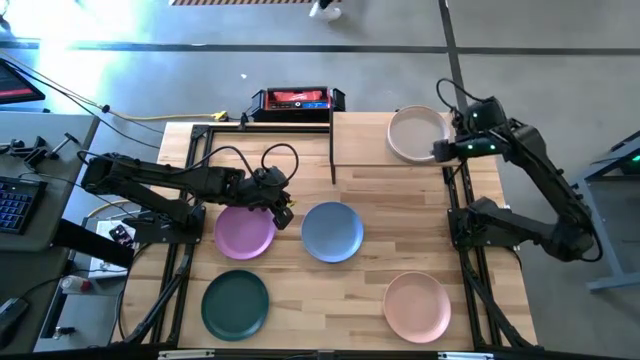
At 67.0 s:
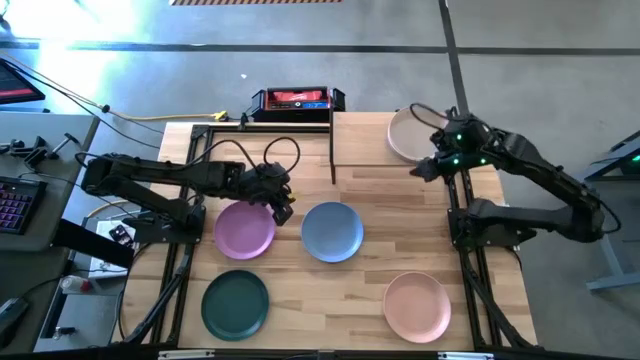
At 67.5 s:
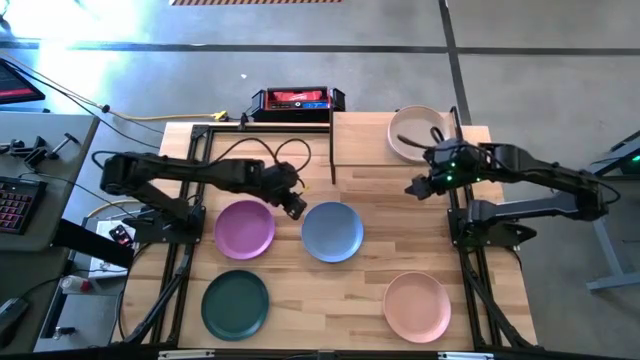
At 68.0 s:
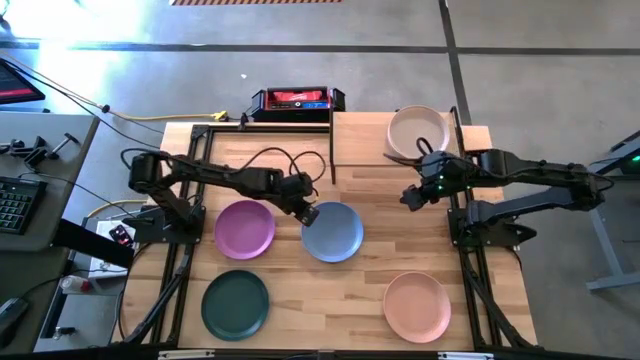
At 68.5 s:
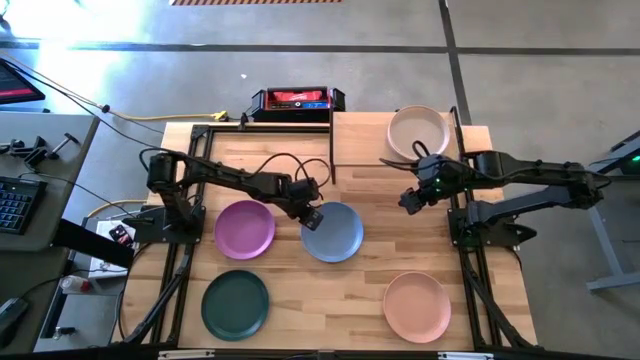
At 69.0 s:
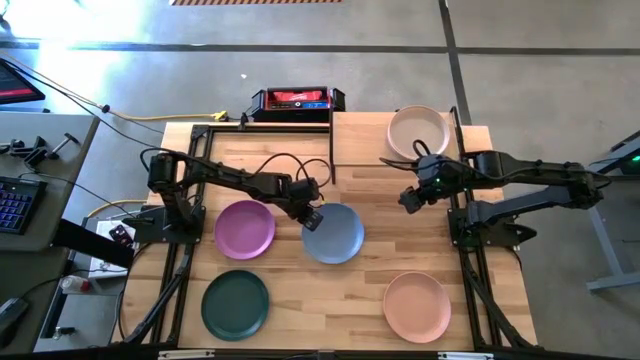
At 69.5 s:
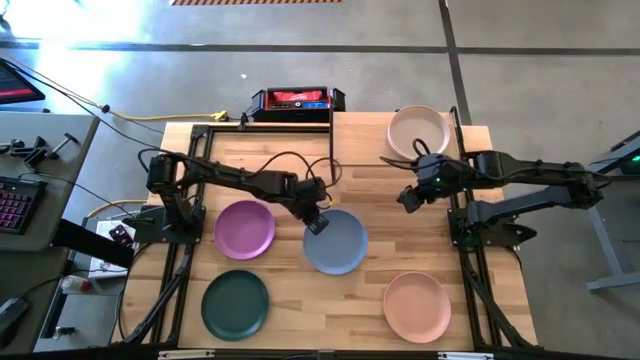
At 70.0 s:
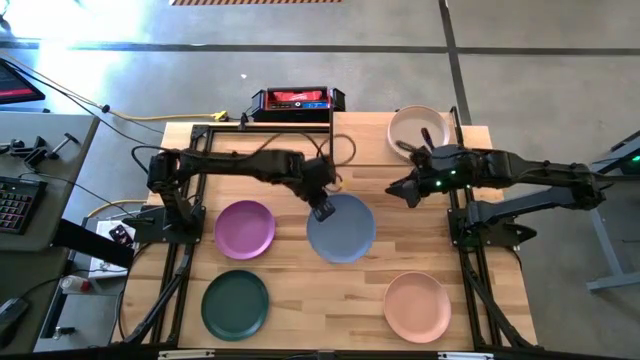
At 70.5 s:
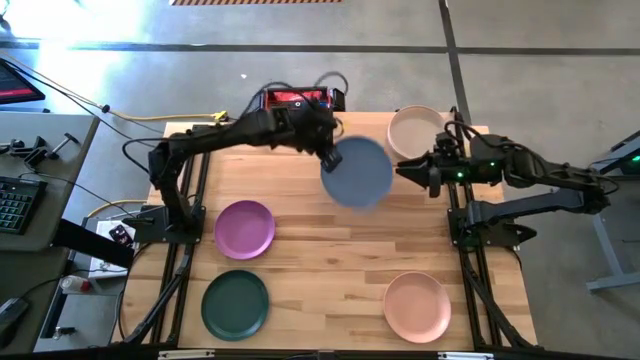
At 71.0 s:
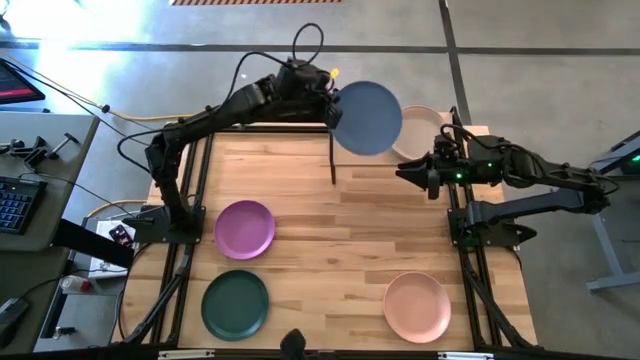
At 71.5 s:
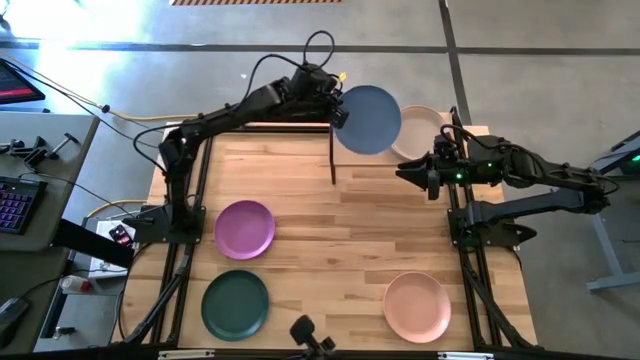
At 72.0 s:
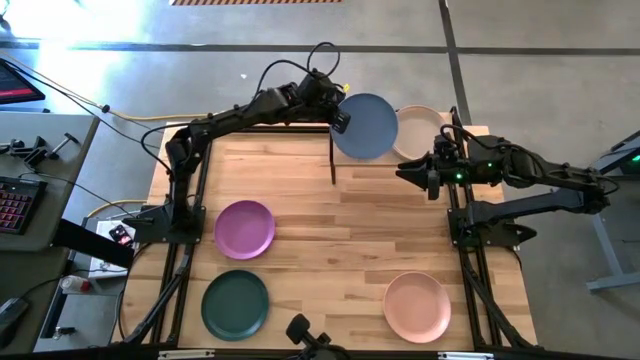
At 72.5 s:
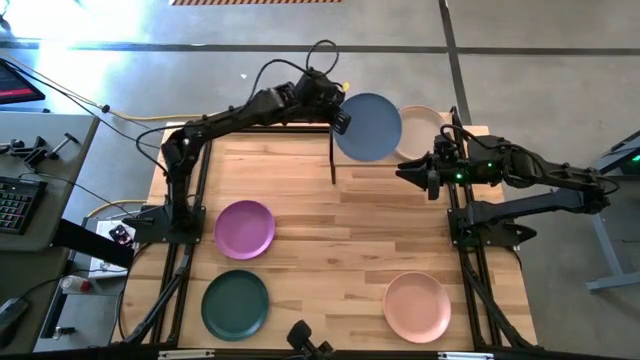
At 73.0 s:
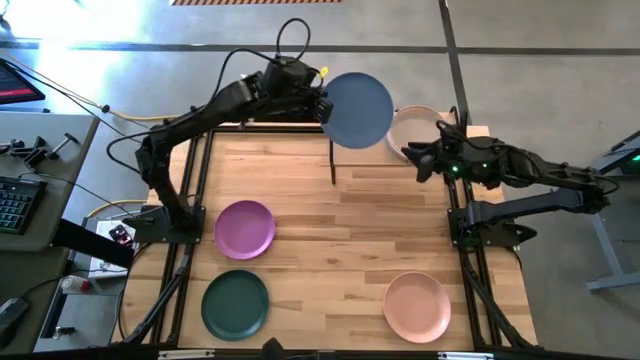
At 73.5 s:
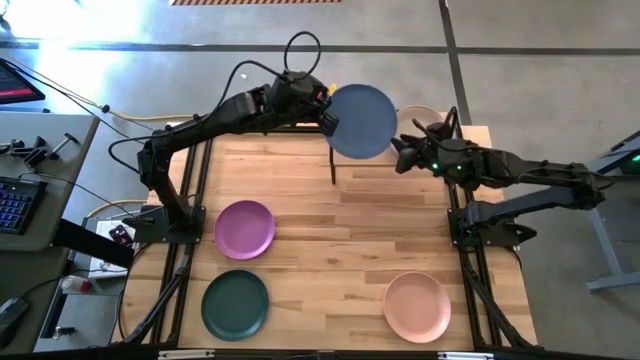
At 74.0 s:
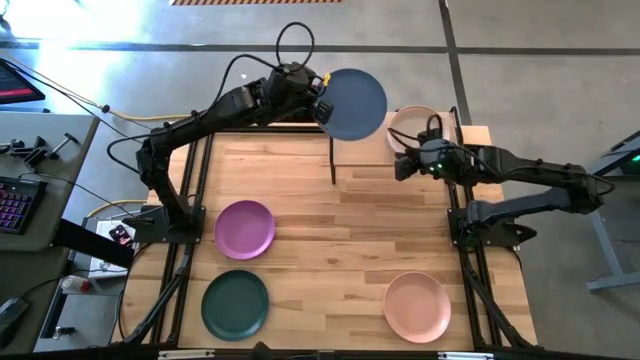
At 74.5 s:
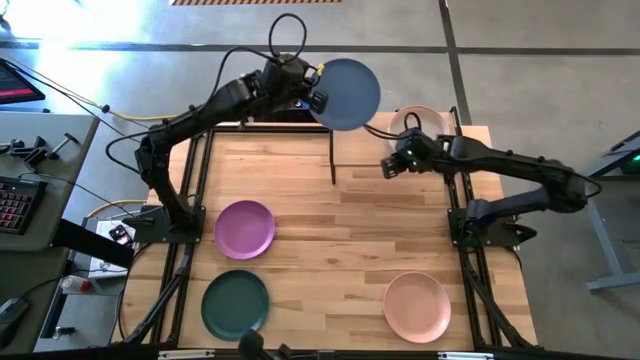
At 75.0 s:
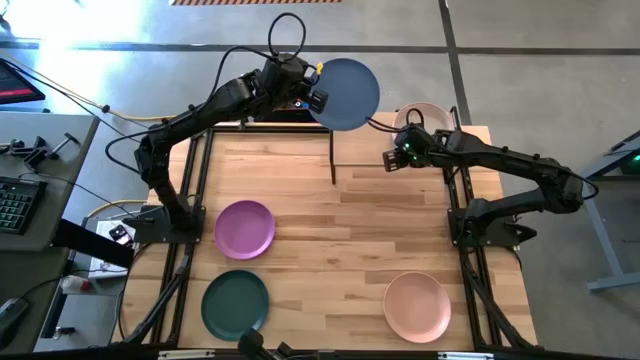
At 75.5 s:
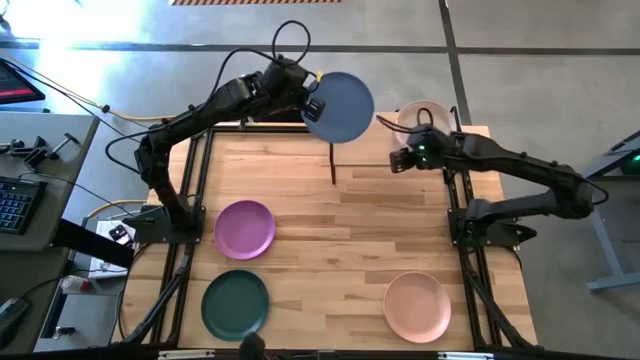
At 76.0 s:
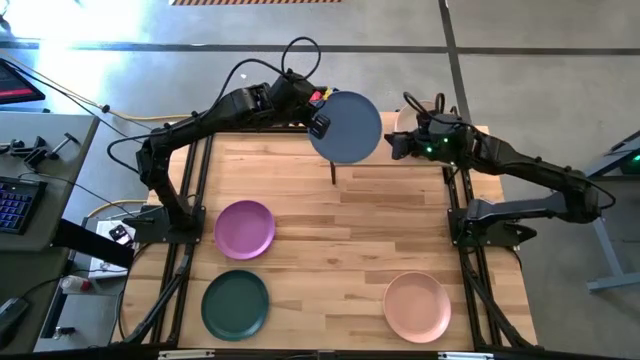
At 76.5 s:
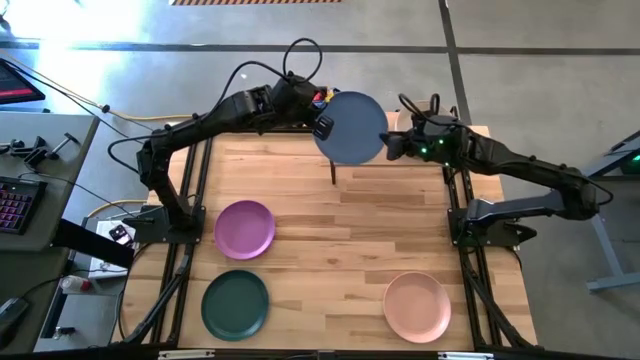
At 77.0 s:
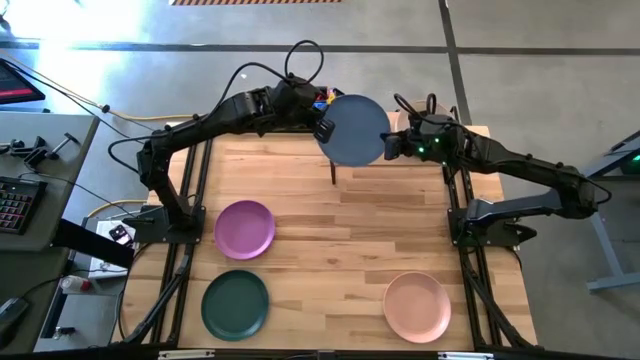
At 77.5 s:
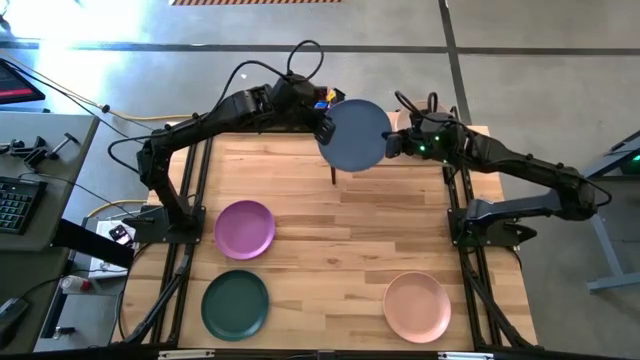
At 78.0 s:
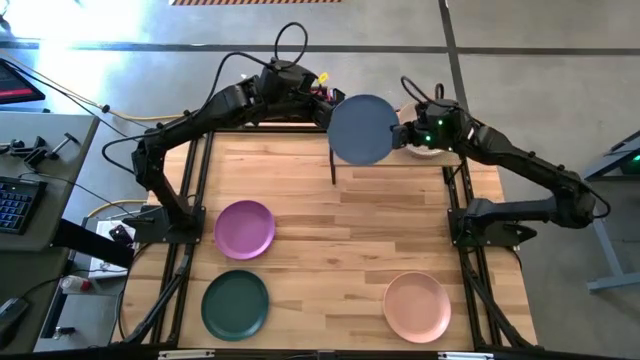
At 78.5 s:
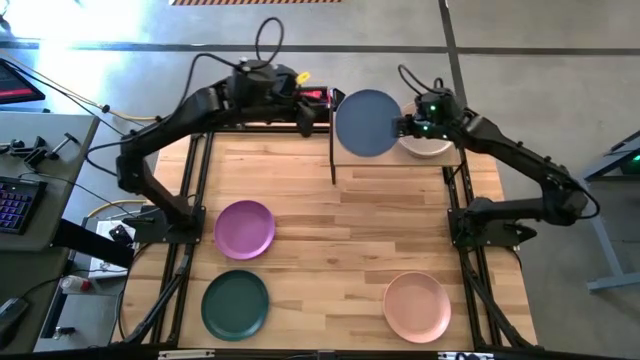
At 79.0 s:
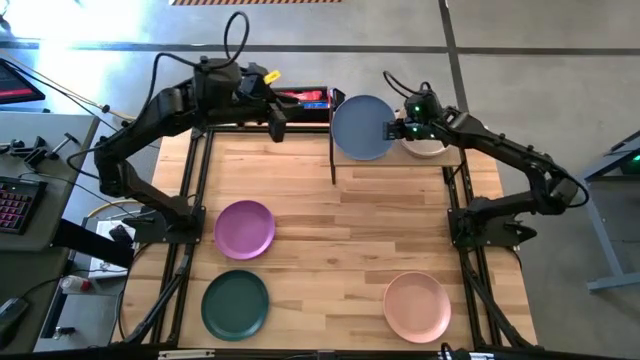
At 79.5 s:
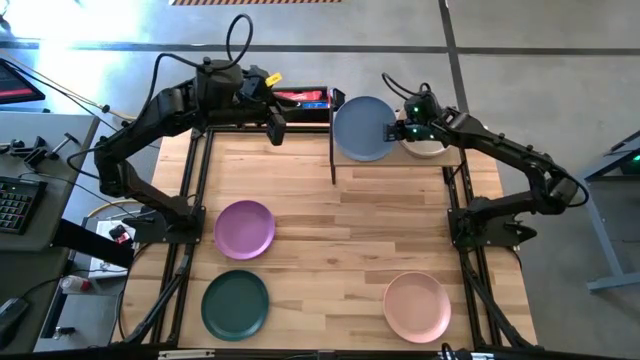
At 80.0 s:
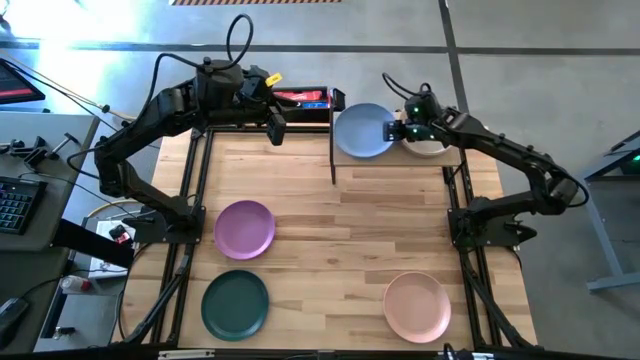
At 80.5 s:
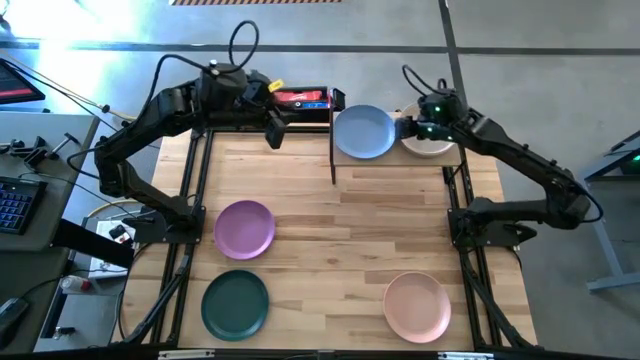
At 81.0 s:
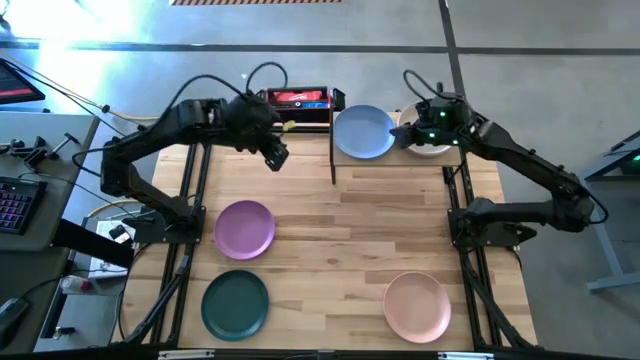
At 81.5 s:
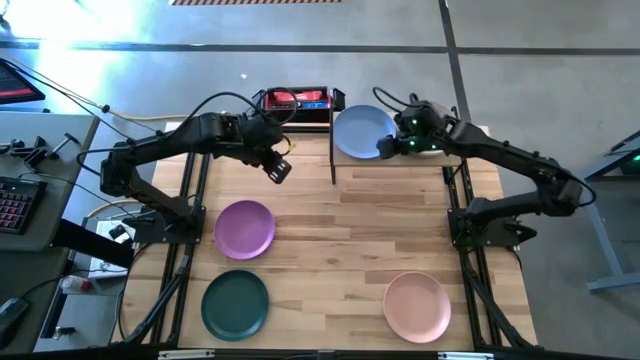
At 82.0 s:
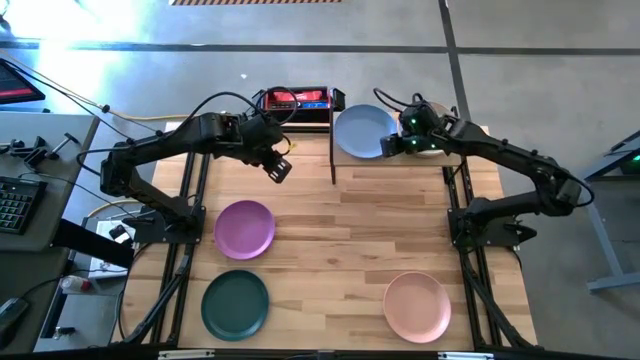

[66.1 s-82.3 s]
Task: Place and stack plates onto a shelf
Put the dark blue plate on the shelf

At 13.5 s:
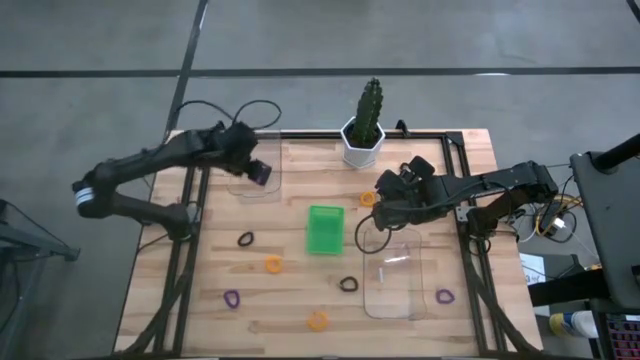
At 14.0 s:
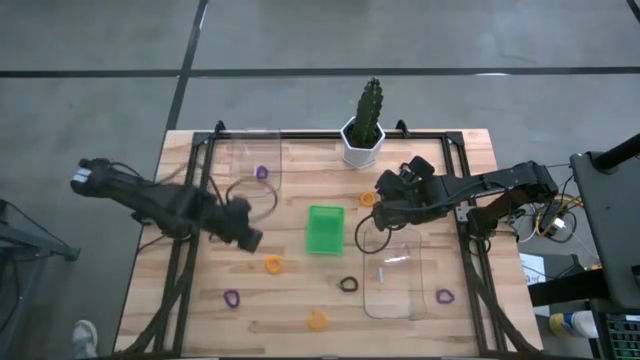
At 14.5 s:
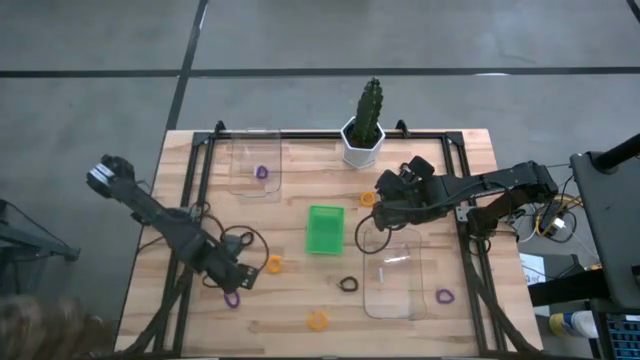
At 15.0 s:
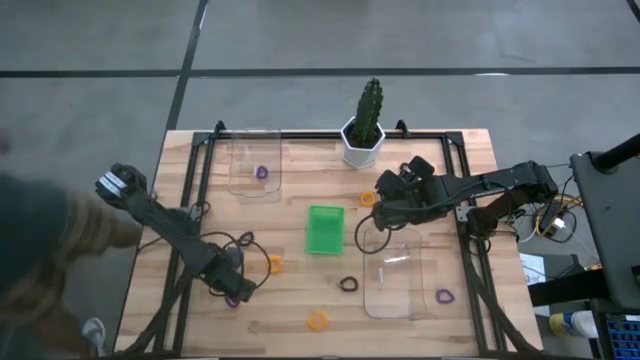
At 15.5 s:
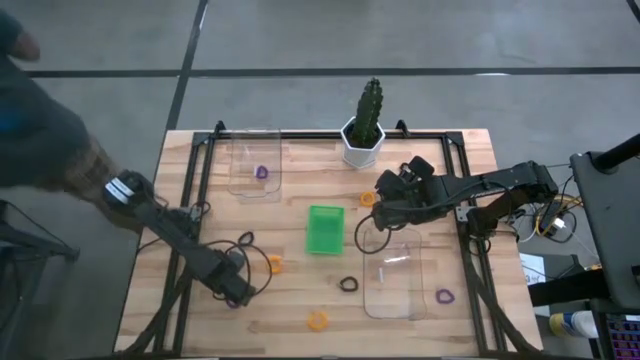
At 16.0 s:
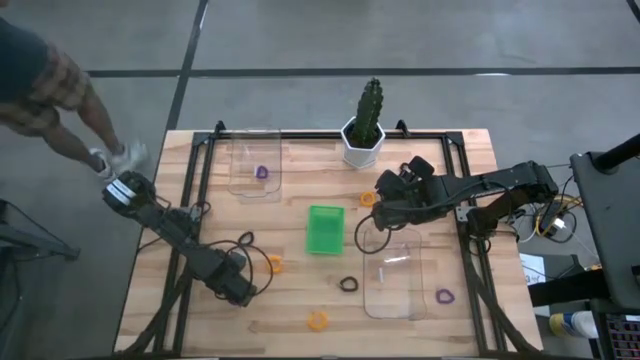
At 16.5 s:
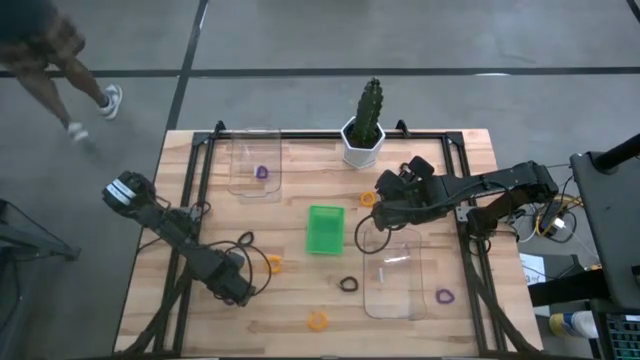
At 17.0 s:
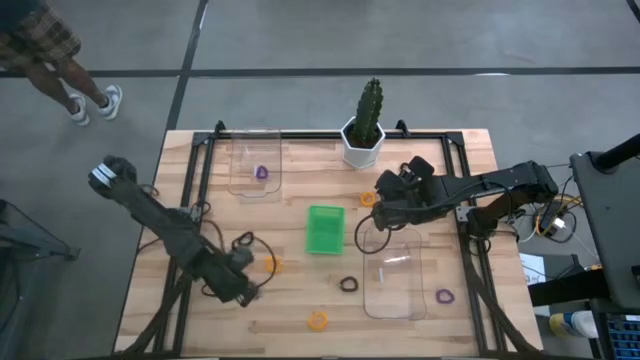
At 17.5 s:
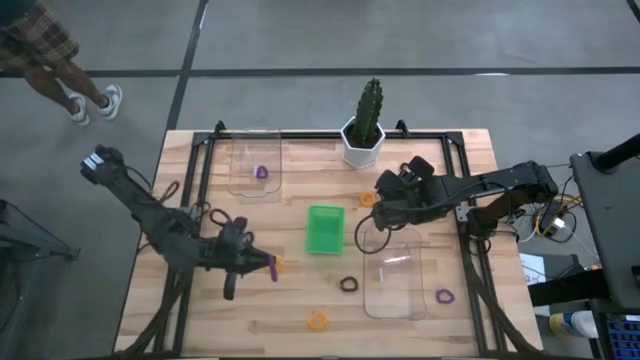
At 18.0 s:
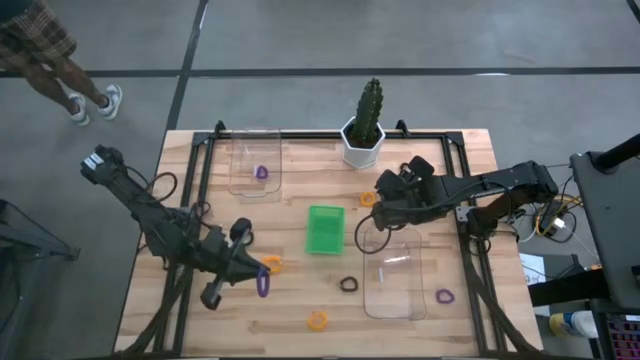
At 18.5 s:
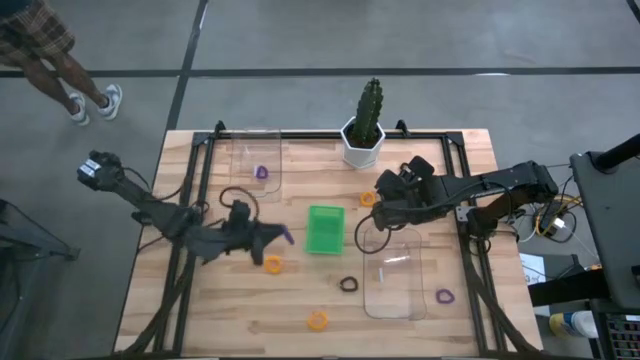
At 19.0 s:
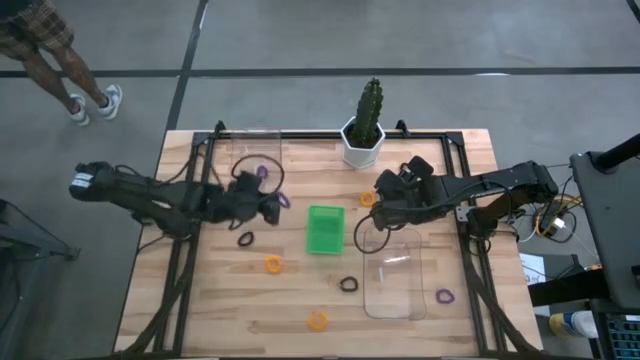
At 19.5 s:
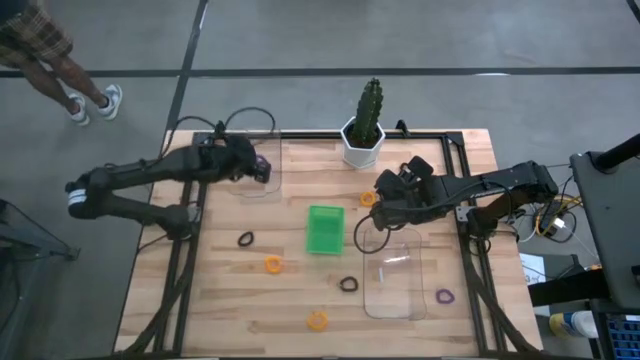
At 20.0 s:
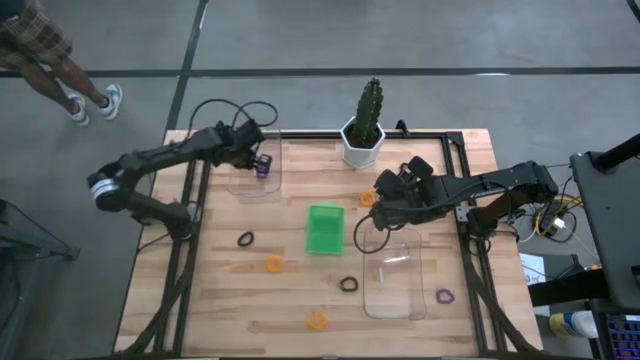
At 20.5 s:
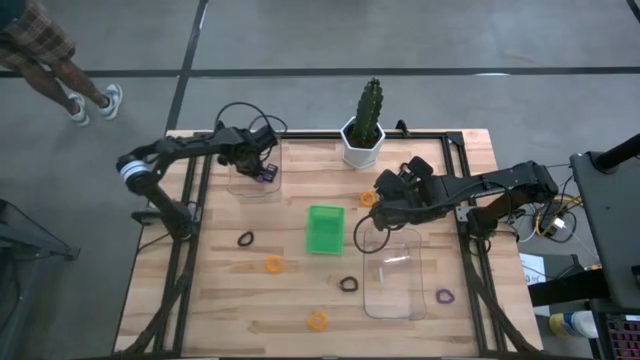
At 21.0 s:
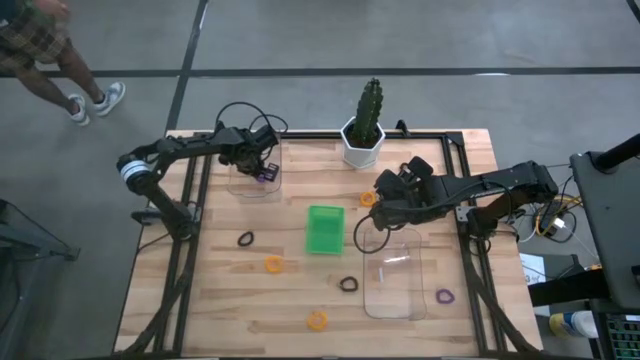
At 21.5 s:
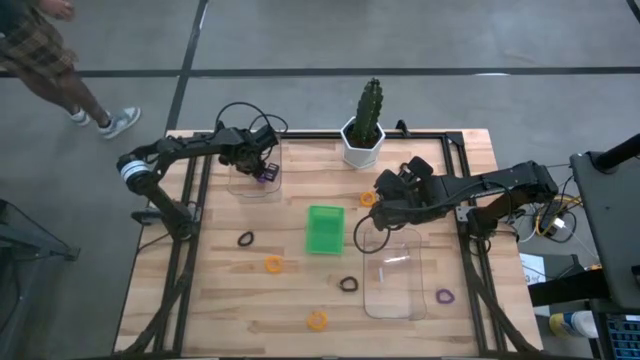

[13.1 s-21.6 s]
Task: Sort spring keychains
Put the left purple spring keychain into the top transparent bin
